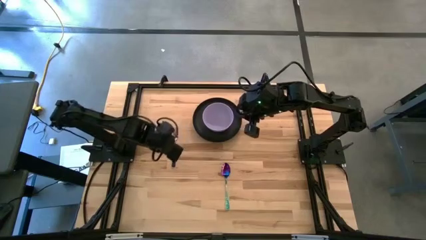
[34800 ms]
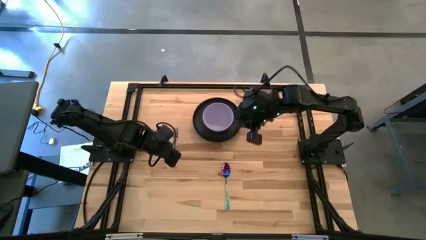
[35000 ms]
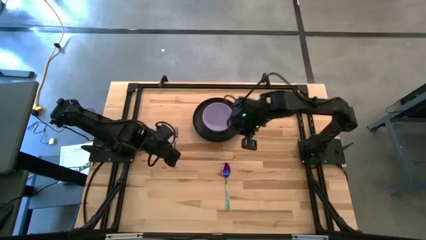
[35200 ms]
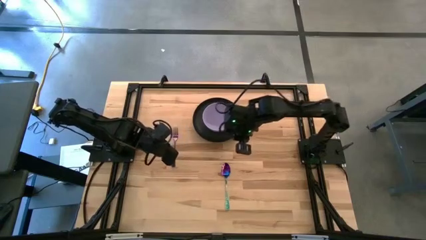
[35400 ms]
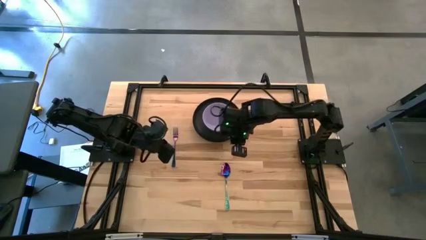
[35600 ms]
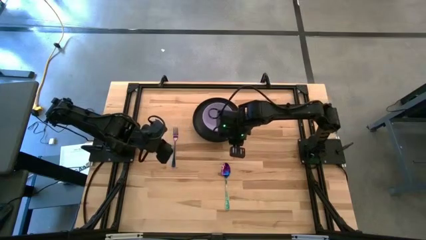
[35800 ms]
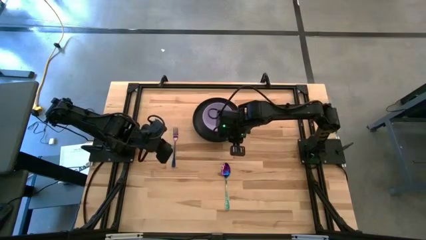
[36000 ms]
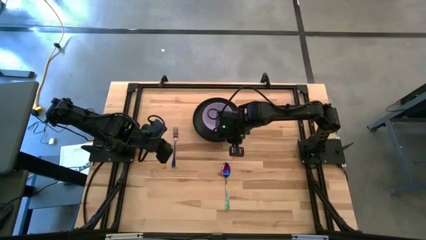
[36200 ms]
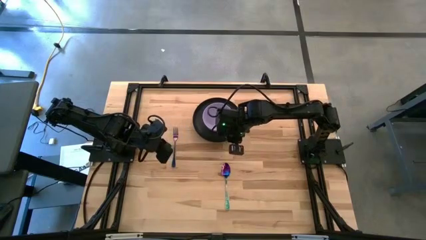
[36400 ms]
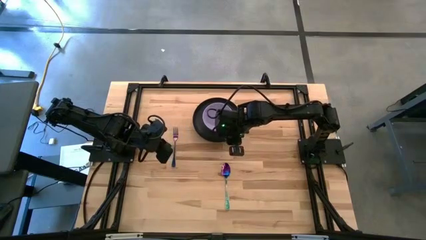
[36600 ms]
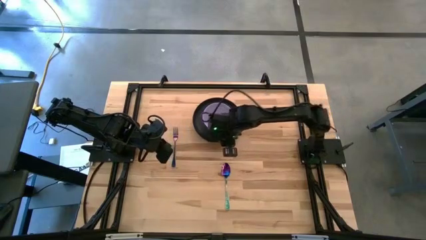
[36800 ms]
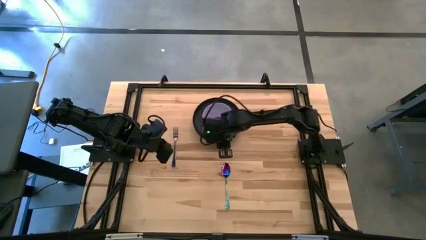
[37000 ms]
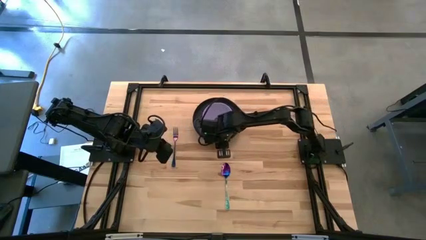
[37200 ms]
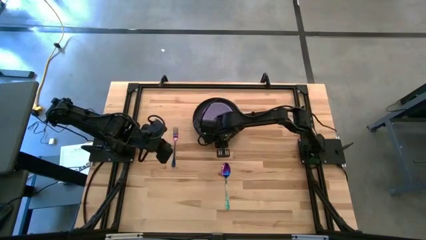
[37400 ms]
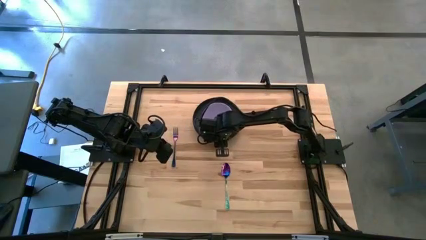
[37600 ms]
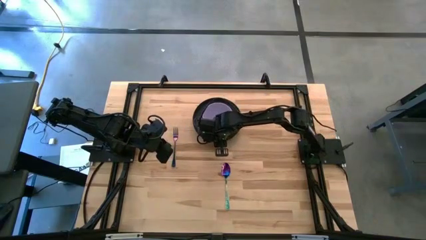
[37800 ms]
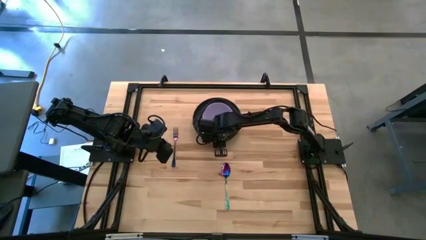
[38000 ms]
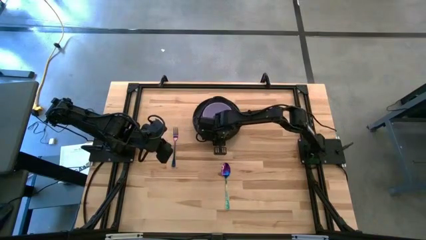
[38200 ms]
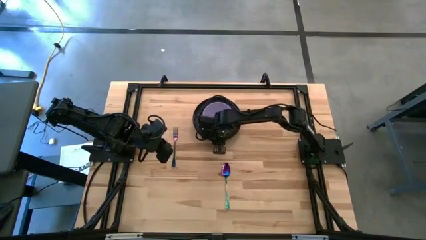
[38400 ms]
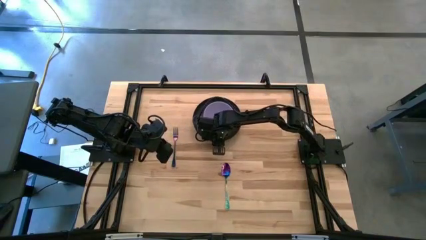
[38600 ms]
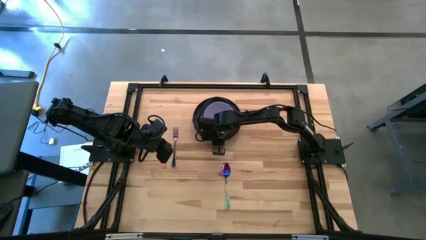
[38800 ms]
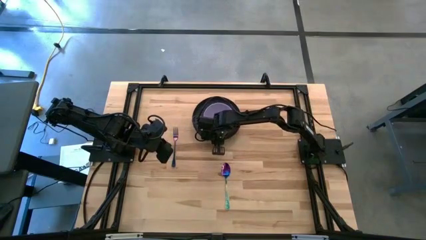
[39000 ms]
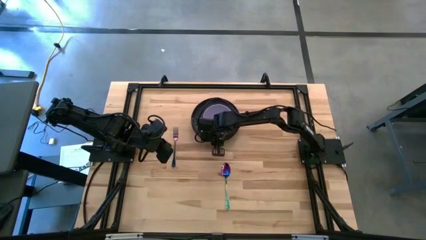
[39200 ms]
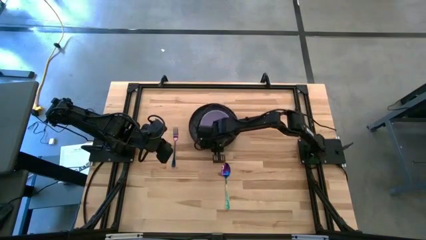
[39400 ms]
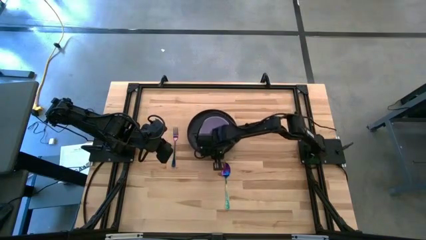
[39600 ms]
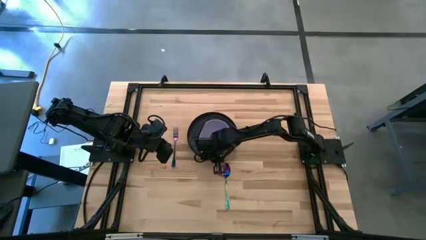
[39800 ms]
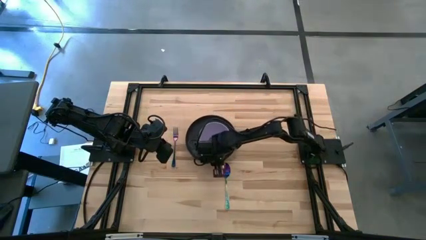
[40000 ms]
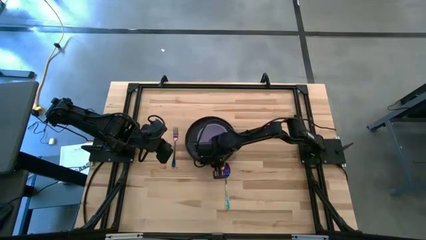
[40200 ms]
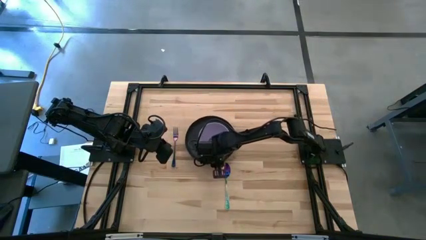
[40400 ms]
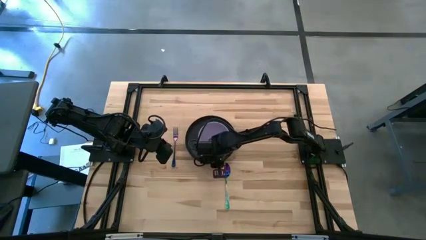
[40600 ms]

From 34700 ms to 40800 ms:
Task: Set table place
Move the black plate to the center of the table

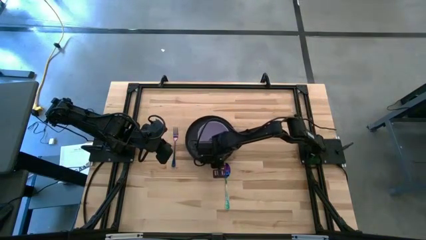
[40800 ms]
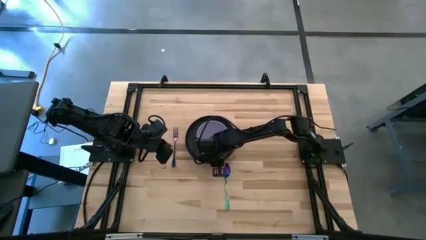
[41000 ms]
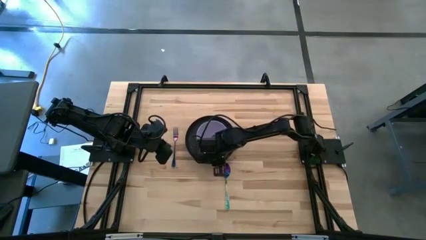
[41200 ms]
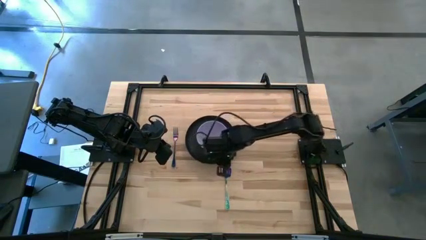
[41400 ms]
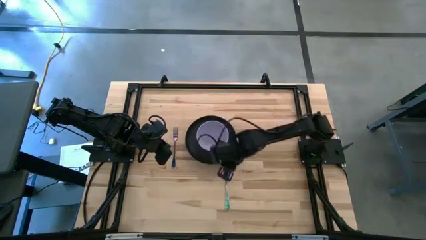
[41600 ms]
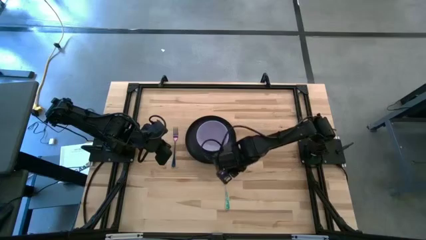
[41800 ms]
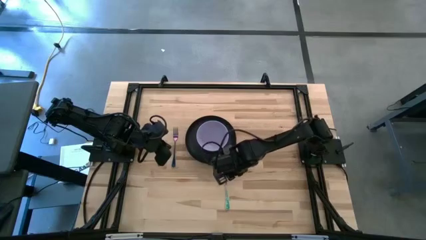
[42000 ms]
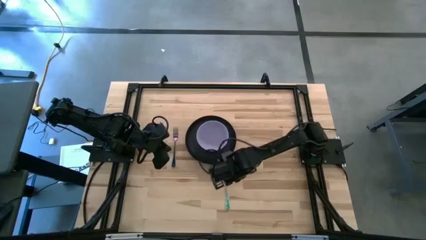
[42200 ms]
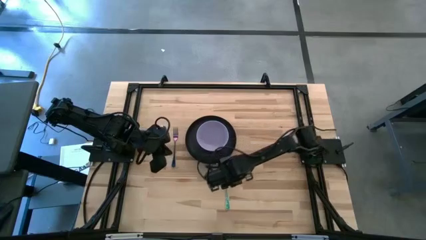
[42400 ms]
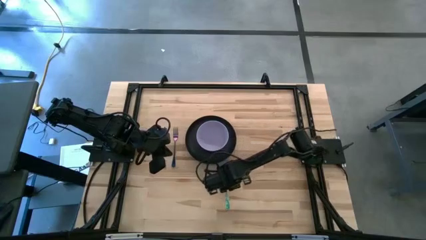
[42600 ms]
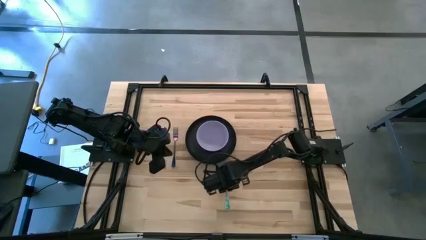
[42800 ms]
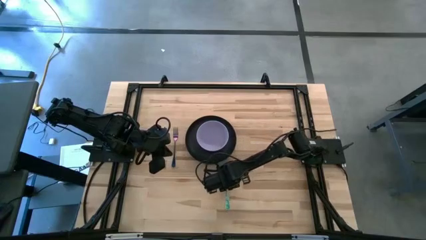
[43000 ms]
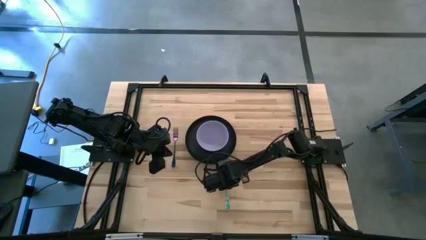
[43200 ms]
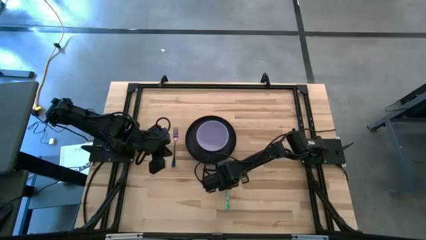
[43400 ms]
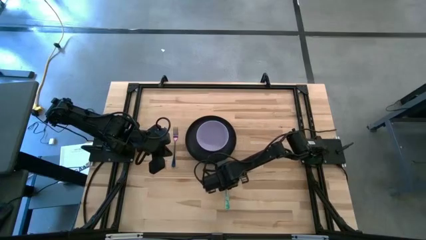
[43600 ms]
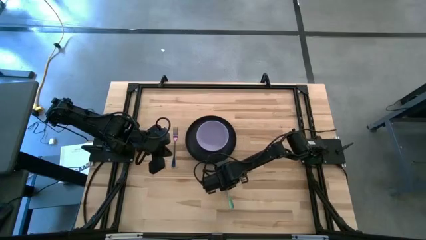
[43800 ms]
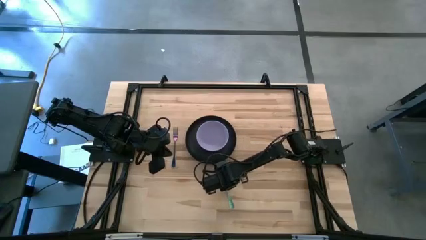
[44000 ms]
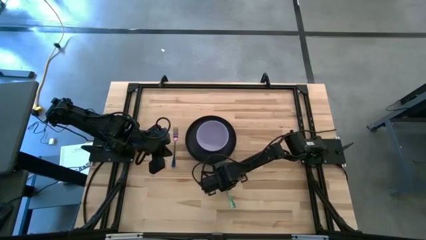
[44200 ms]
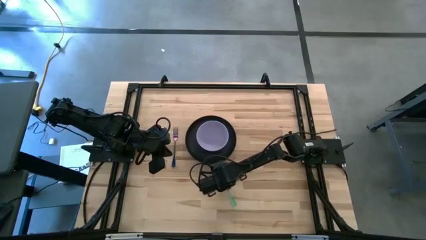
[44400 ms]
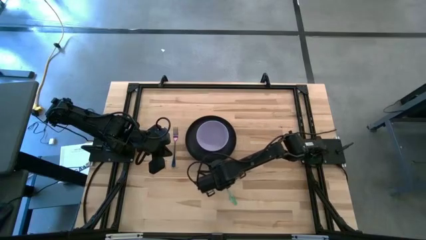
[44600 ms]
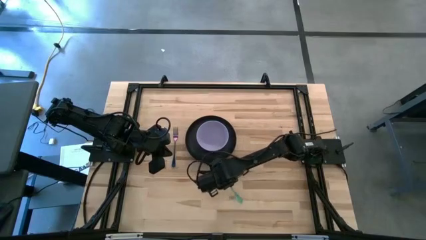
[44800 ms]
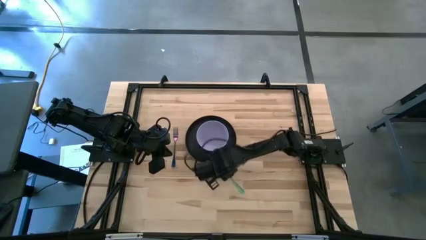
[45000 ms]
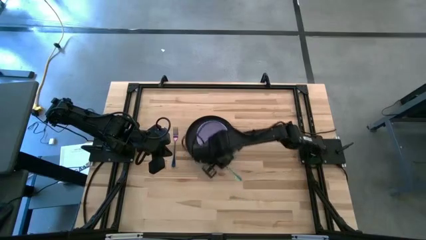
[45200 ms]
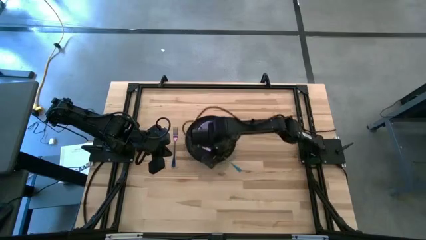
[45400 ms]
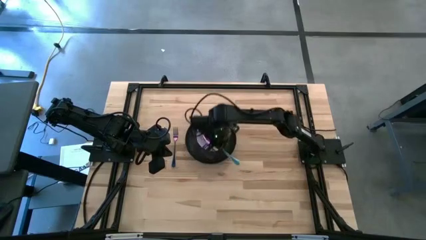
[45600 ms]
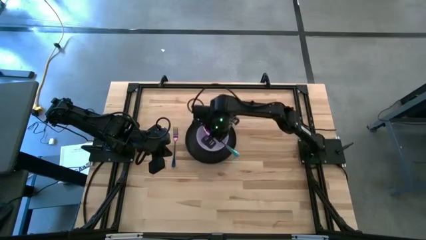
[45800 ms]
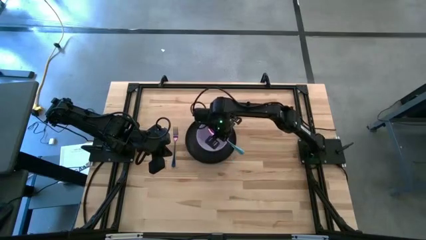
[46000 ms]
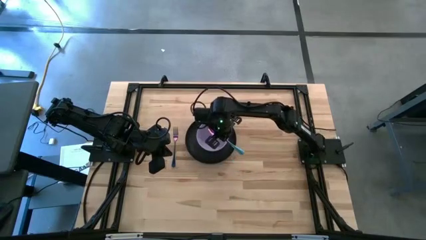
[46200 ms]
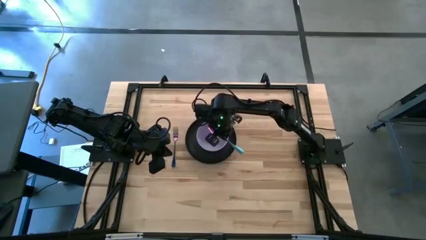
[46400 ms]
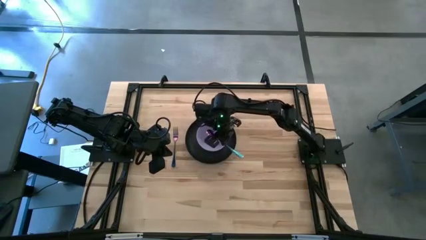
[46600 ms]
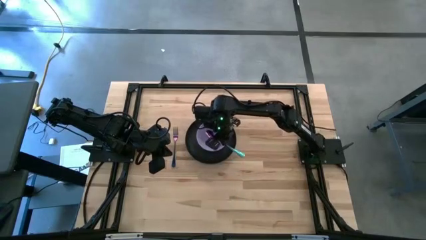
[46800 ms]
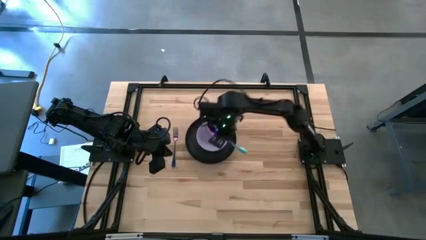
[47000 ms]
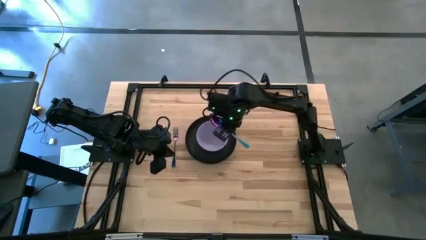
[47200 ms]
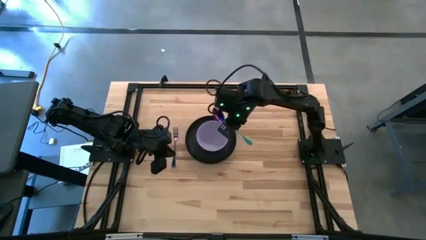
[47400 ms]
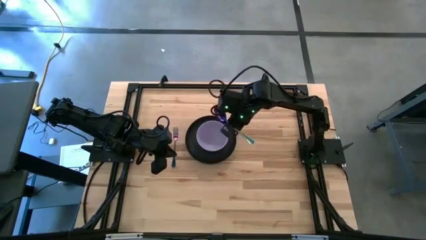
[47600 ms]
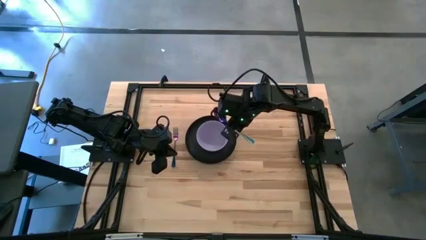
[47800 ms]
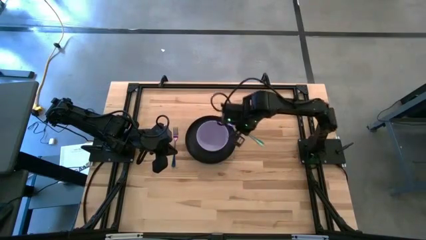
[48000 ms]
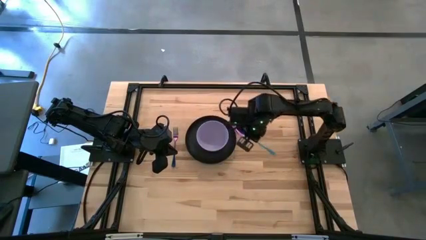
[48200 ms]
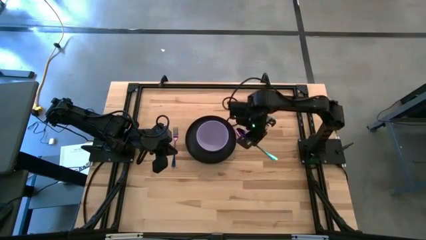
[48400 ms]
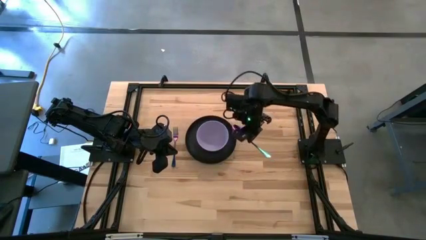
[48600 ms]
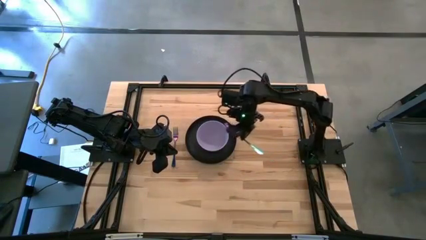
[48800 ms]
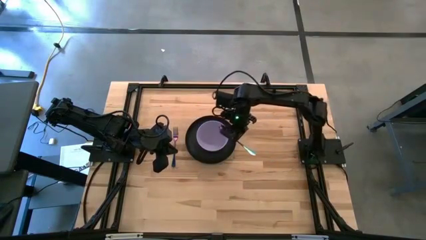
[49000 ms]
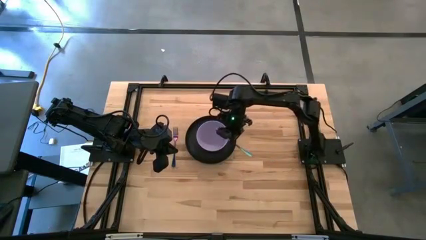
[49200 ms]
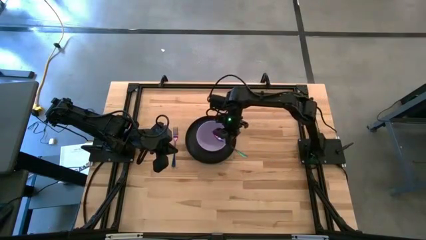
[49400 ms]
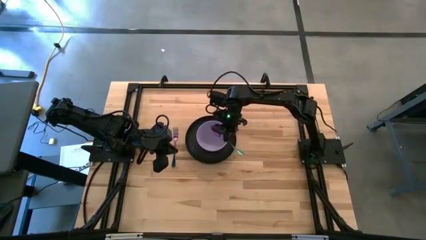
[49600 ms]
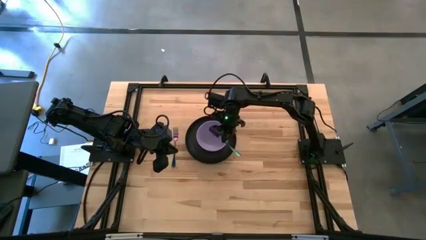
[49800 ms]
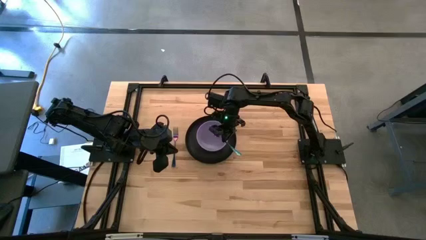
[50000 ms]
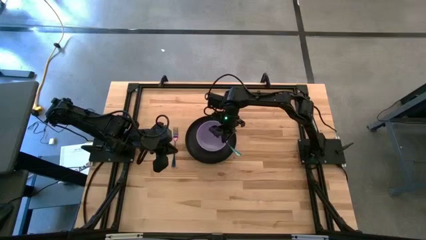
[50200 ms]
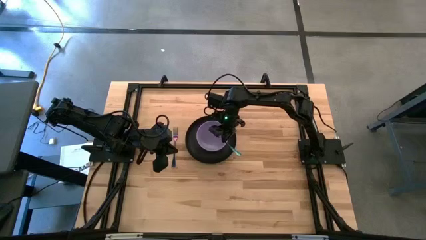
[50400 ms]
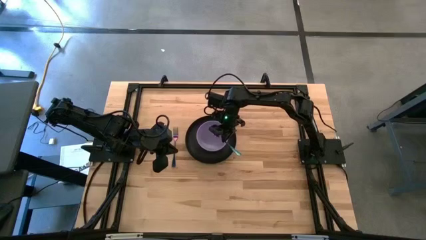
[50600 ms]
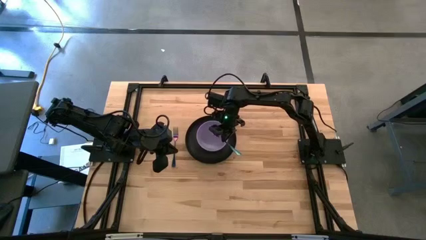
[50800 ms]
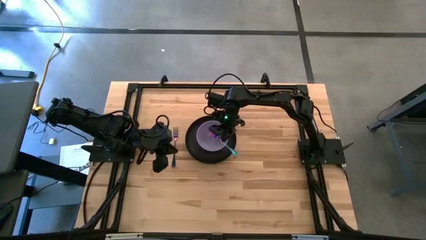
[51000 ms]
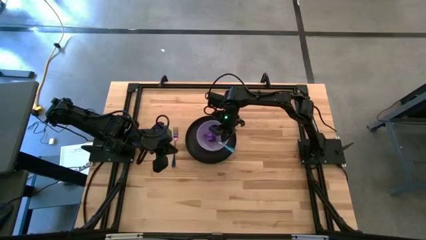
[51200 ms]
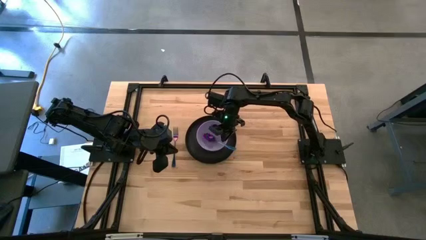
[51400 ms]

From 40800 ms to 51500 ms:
Put the dark purple spoon on top of the bowl
